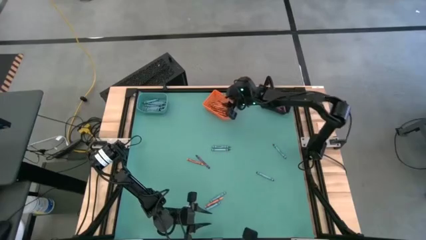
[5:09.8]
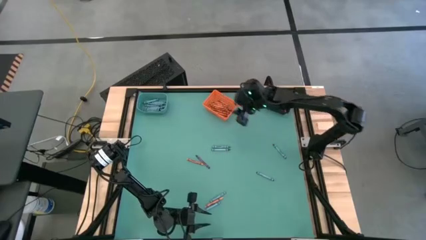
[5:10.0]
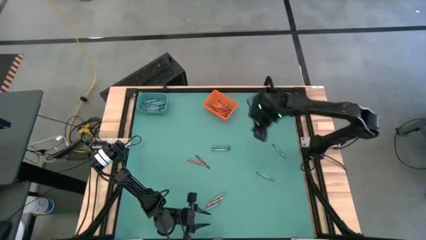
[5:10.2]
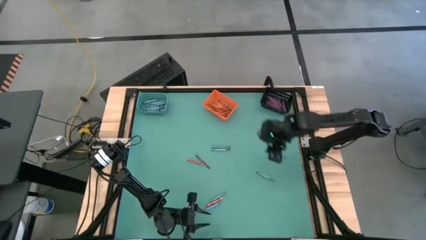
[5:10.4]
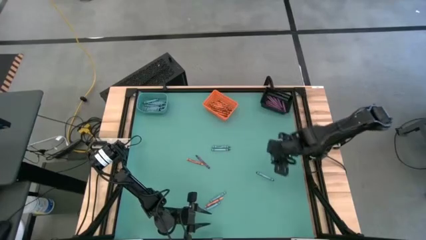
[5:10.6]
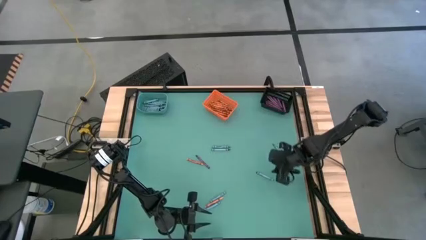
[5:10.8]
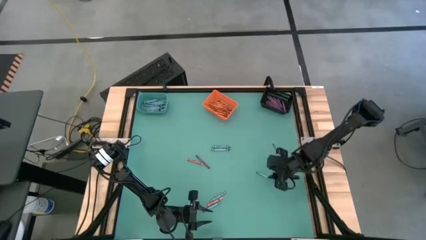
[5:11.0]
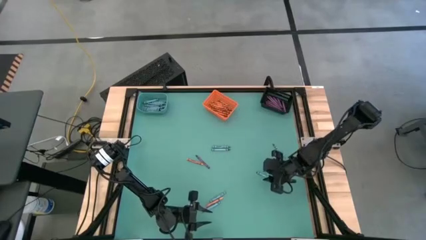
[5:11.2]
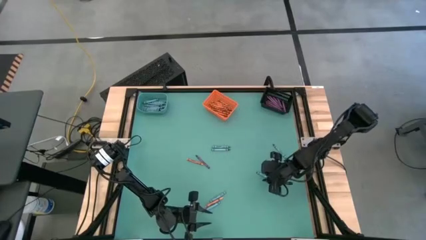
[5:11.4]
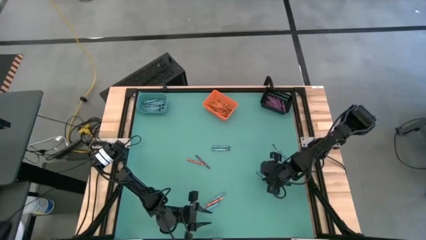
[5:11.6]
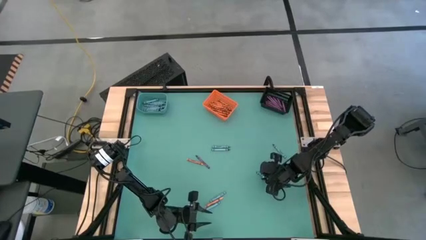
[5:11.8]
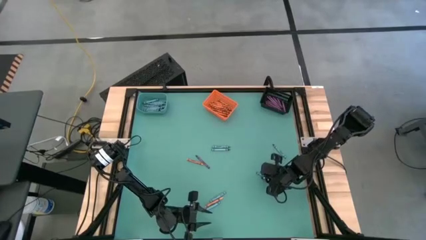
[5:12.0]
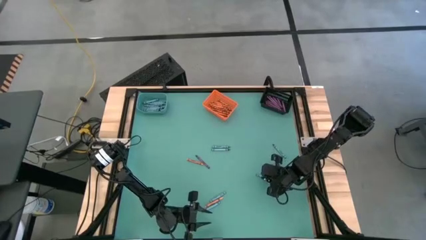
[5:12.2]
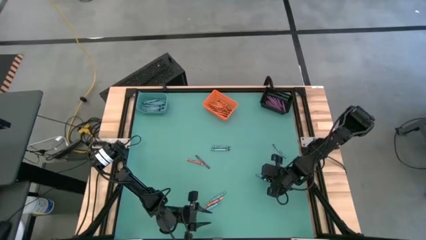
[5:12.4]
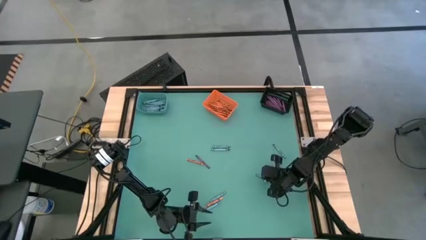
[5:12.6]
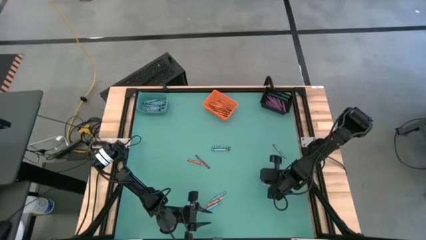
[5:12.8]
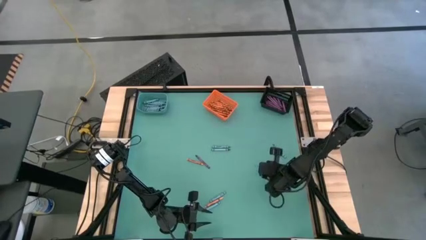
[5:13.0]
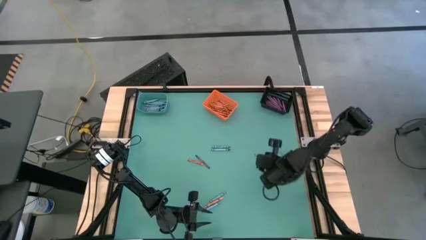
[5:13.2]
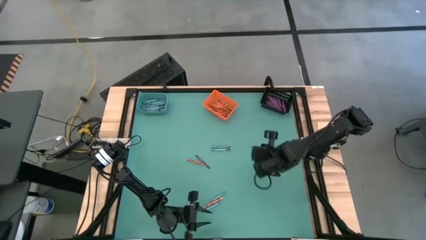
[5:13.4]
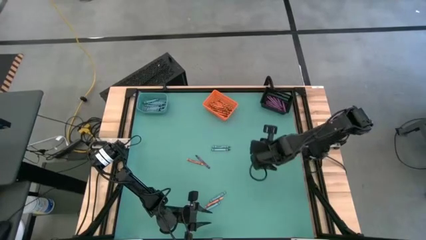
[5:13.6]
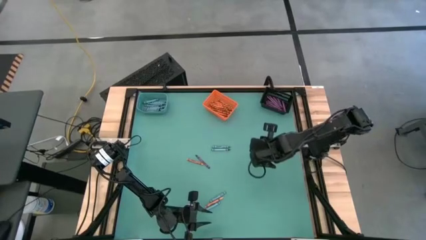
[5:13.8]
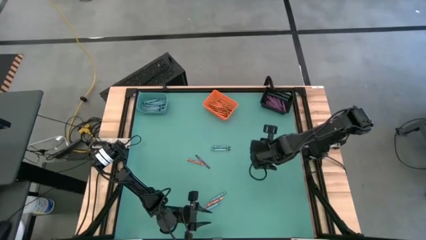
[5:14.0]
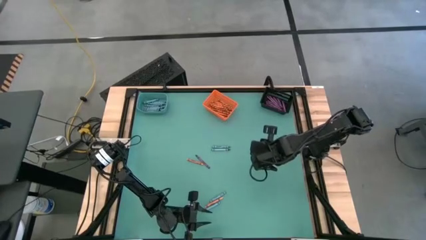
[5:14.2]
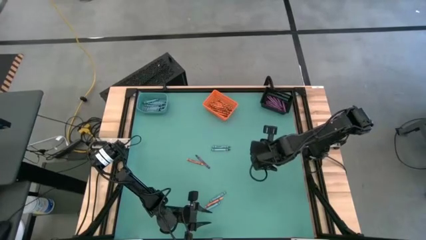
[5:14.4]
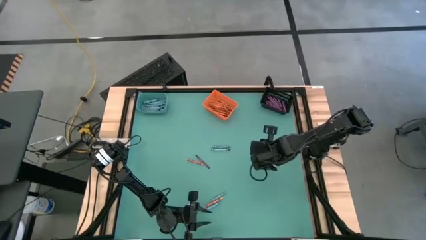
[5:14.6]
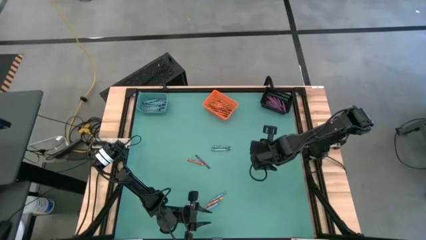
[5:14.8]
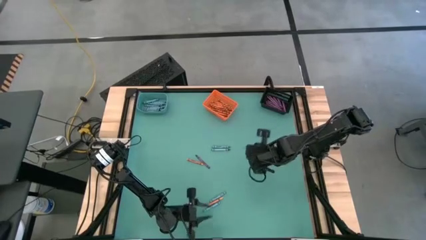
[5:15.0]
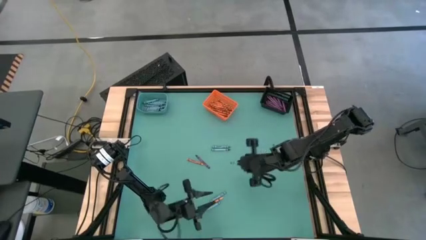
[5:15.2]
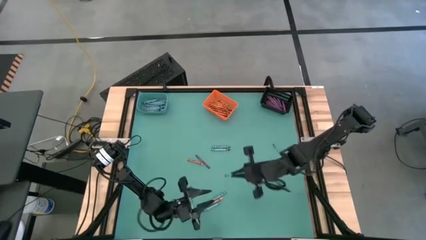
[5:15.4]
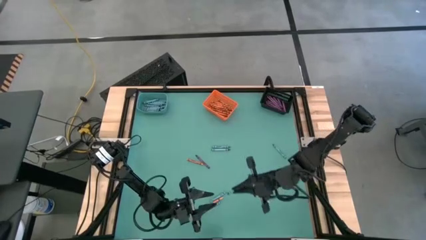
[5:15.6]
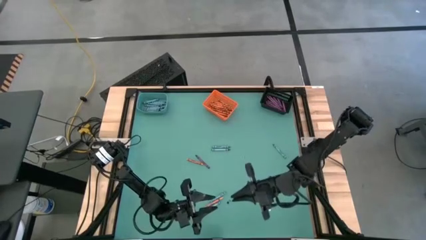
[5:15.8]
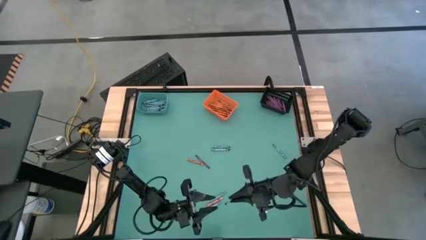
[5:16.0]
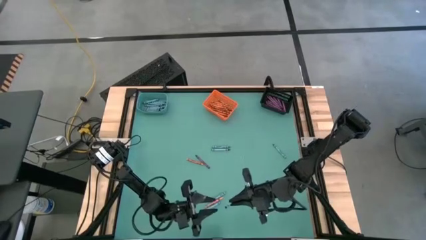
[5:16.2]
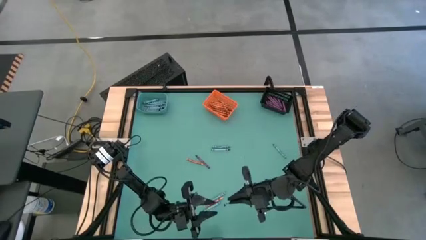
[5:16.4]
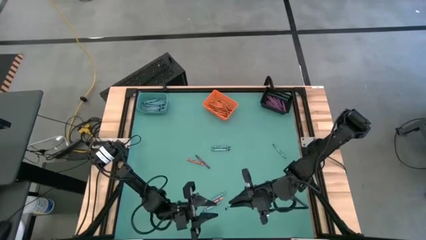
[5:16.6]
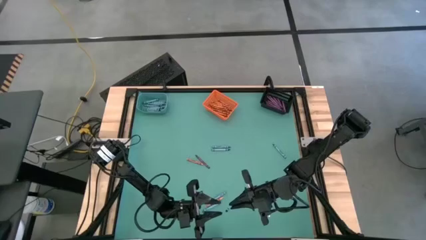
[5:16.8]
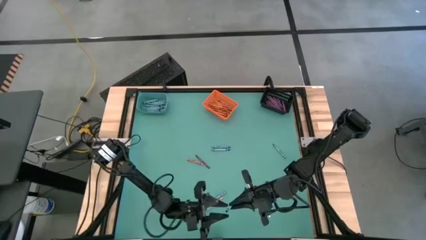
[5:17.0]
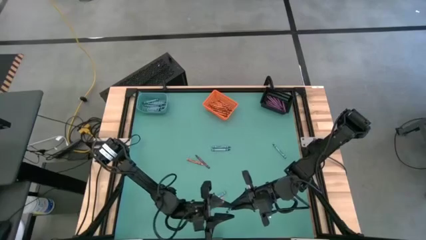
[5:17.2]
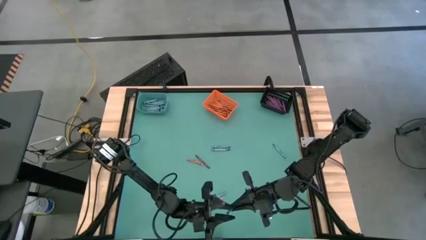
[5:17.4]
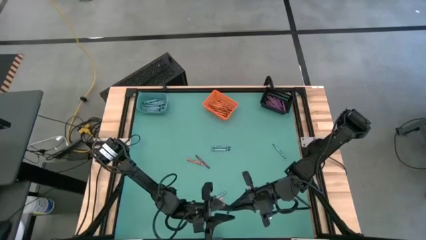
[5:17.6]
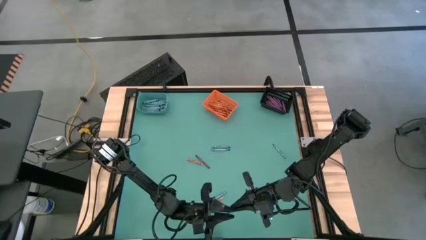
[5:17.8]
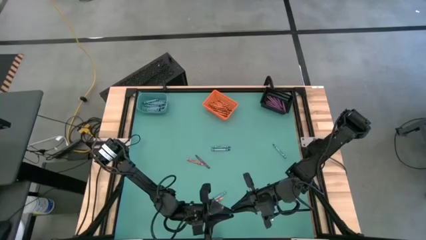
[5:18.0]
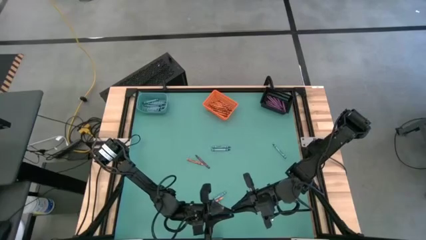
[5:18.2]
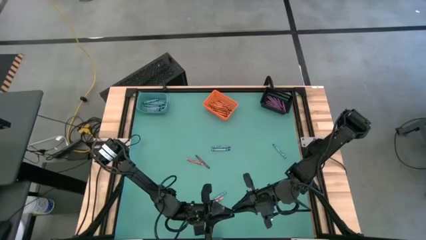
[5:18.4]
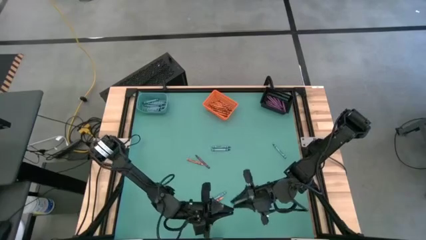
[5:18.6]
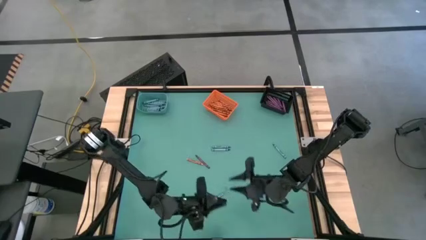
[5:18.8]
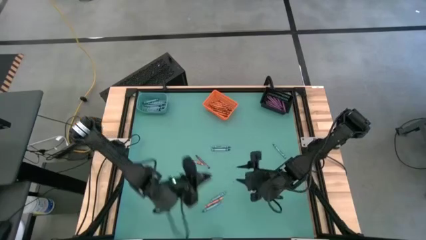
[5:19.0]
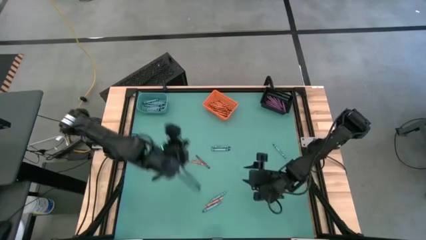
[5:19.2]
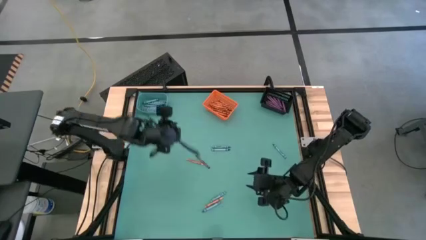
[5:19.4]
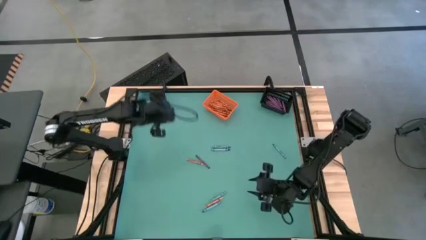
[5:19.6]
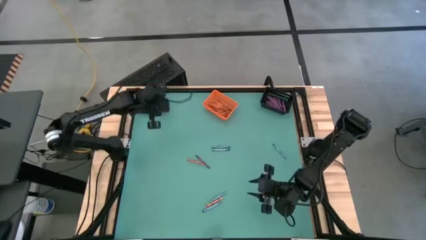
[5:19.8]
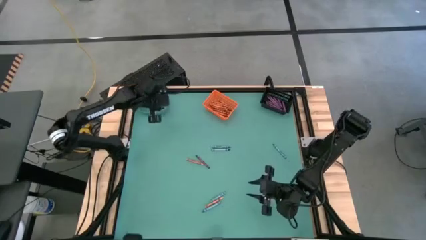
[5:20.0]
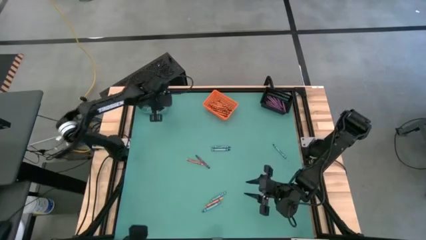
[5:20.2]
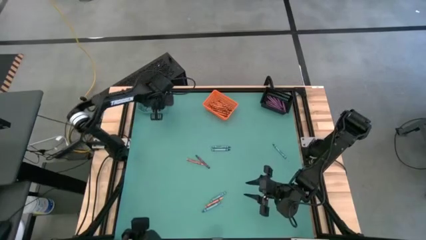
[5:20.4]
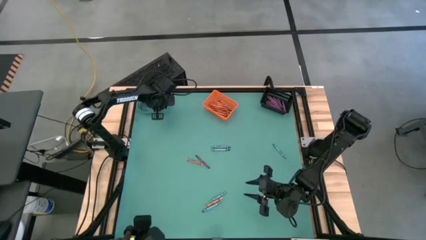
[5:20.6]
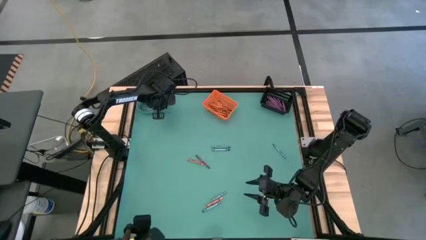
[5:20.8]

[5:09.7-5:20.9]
Task: Sort crayons
Put the blue crayon into the blue bin

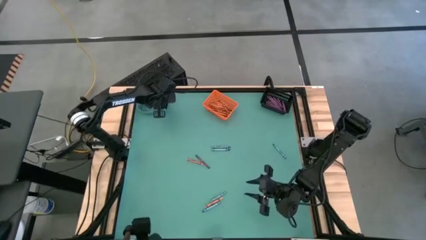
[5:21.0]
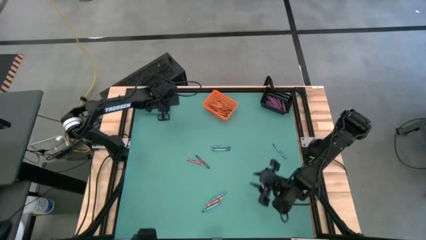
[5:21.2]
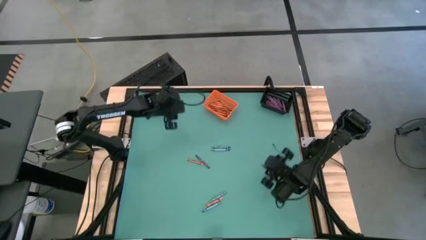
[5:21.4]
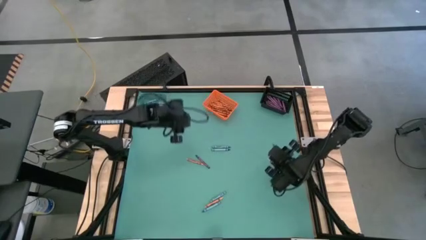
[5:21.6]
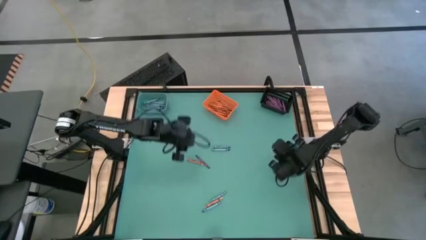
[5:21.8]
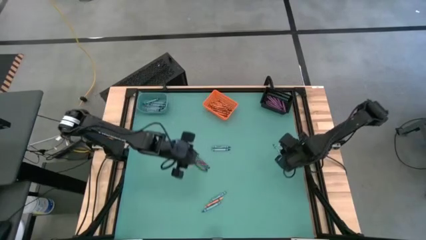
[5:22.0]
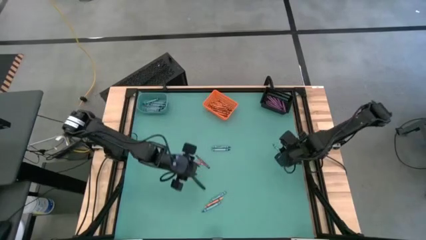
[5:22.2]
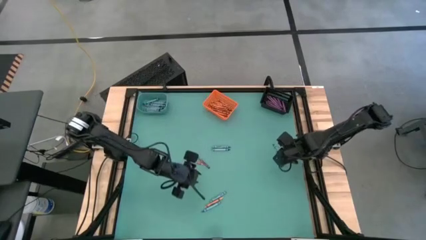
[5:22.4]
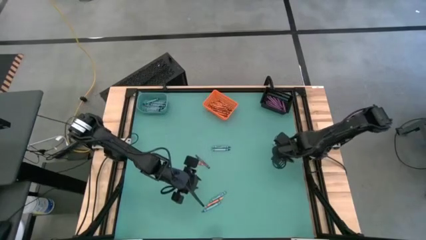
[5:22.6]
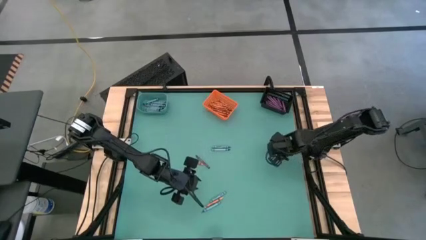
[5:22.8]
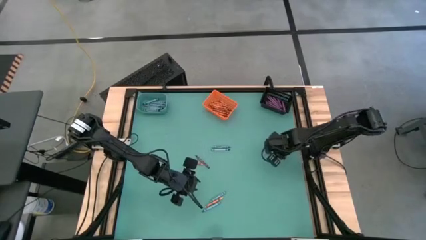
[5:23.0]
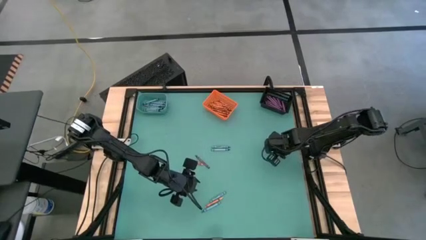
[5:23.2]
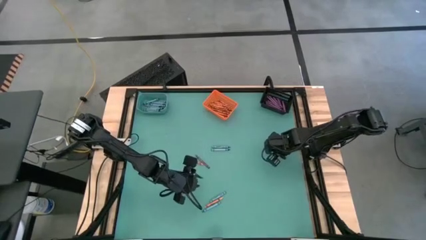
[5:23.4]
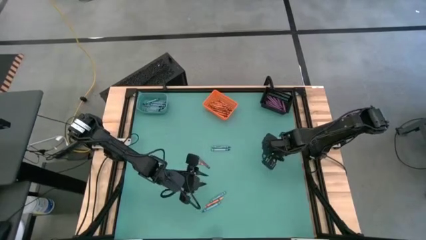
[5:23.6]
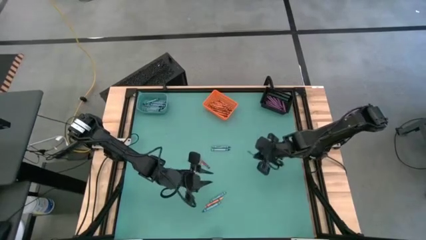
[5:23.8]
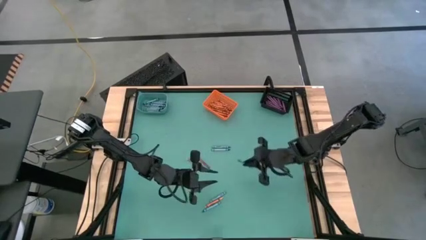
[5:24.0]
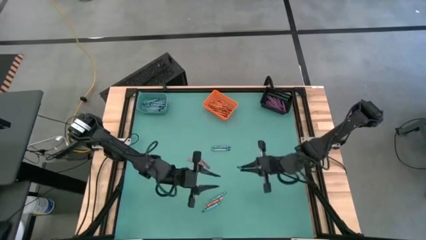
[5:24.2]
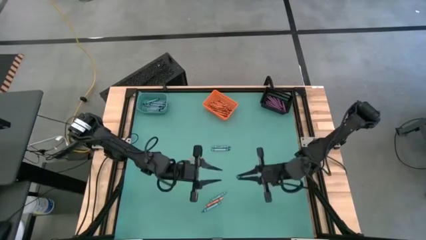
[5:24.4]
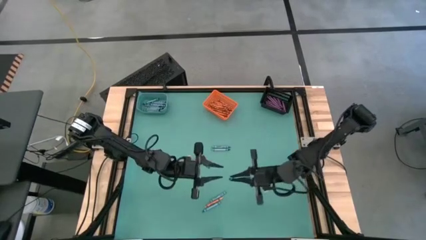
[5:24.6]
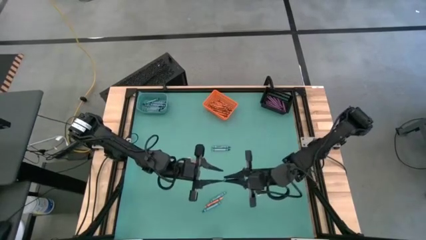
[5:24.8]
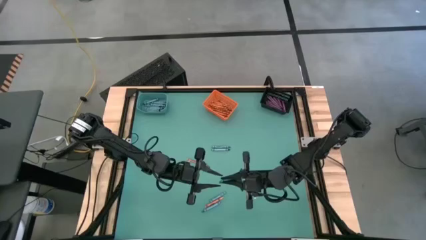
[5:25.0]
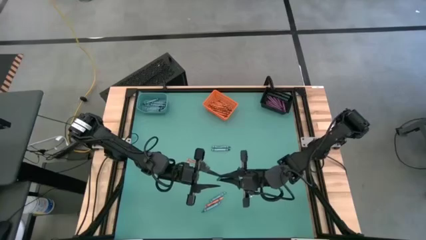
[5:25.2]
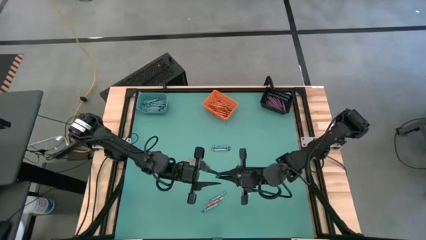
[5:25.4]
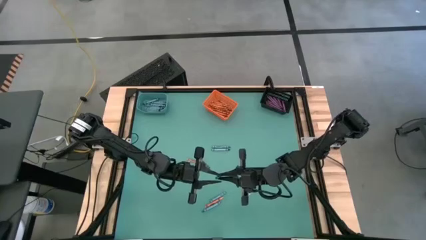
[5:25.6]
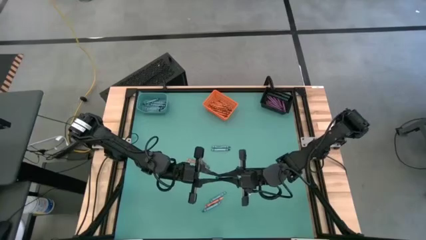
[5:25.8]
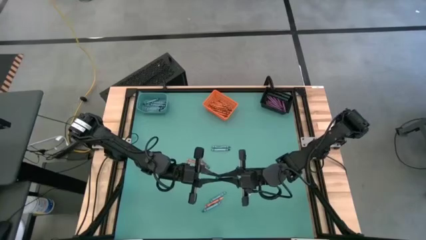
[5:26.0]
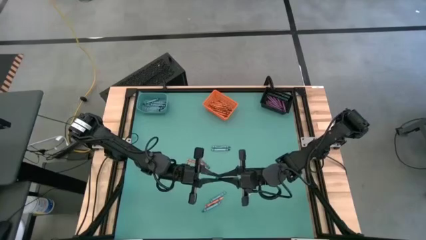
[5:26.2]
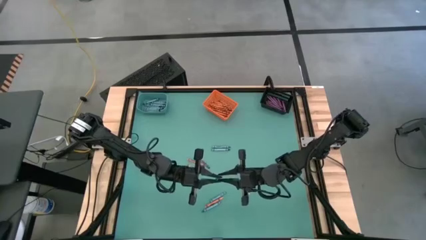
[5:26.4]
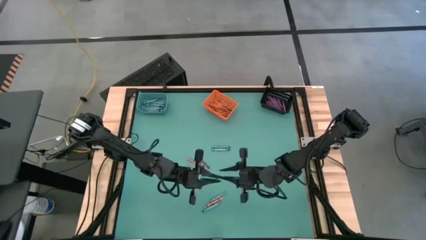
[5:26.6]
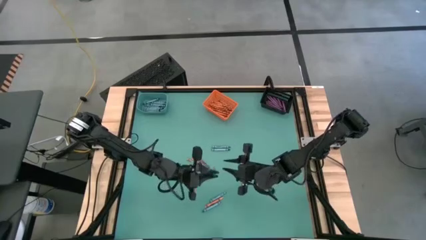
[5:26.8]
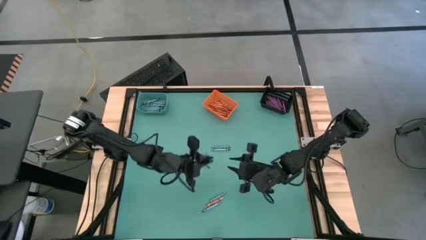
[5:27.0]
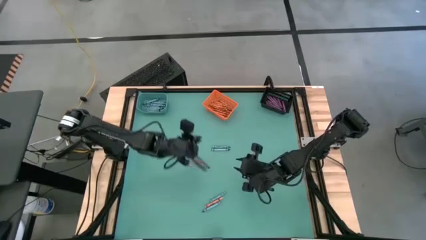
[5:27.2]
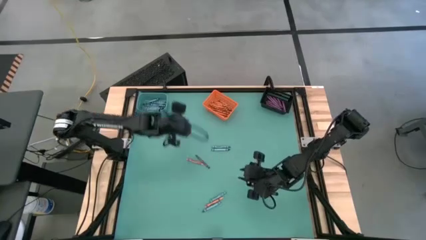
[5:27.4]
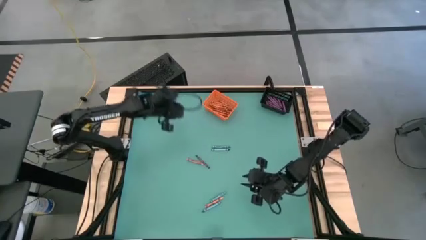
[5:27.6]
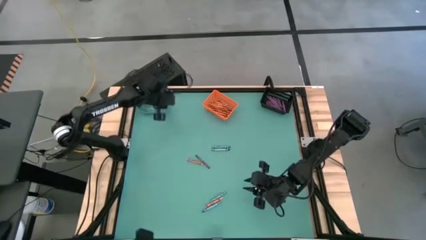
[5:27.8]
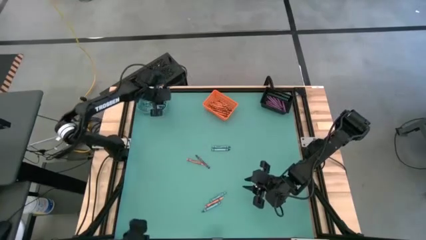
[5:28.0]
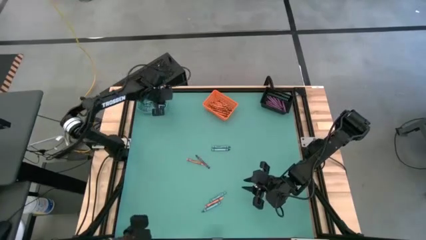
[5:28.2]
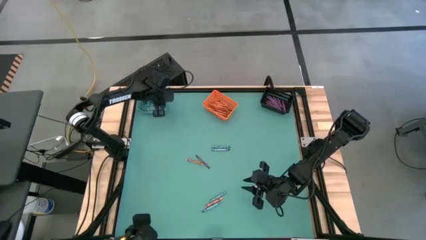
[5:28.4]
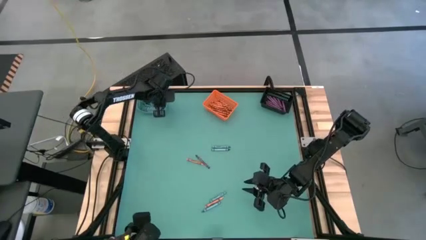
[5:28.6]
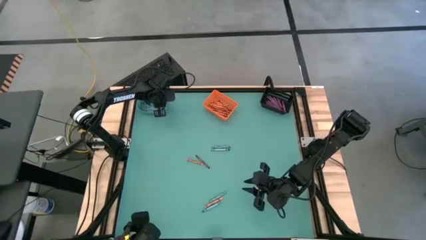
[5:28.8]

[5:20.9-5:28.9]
Put the blue crayon into the blue bin
